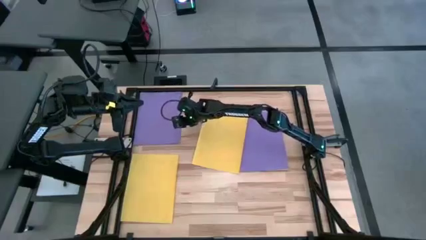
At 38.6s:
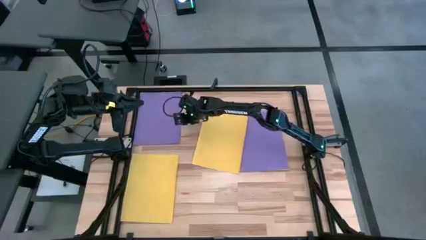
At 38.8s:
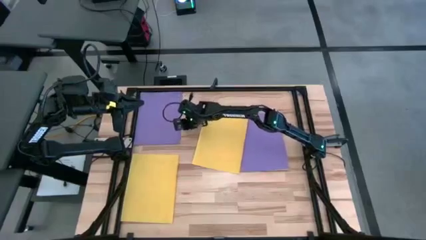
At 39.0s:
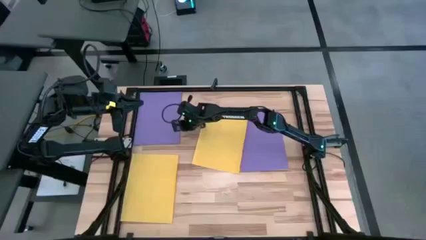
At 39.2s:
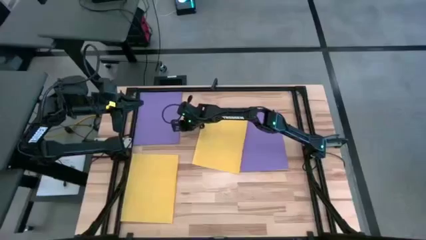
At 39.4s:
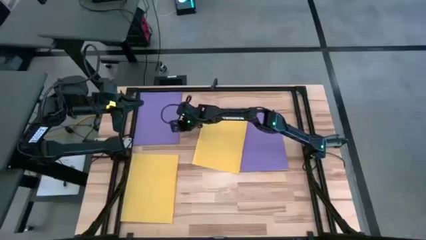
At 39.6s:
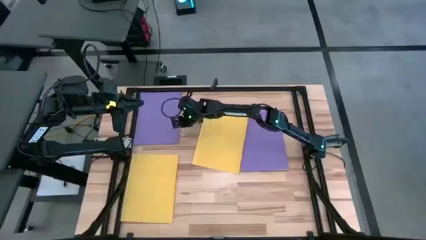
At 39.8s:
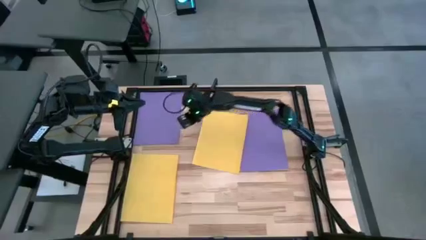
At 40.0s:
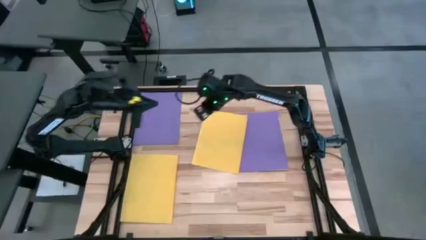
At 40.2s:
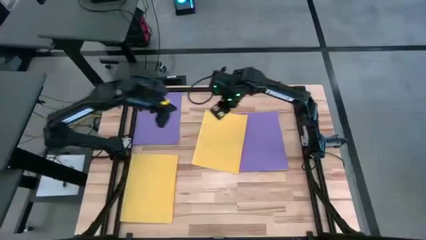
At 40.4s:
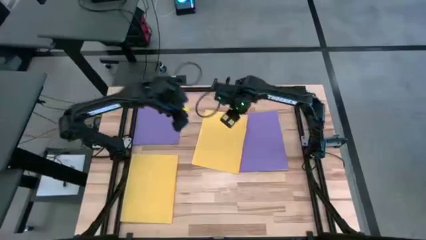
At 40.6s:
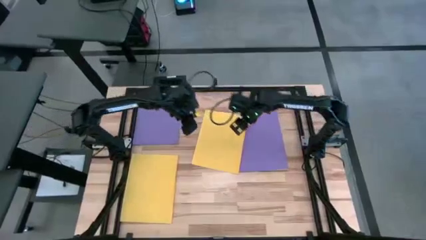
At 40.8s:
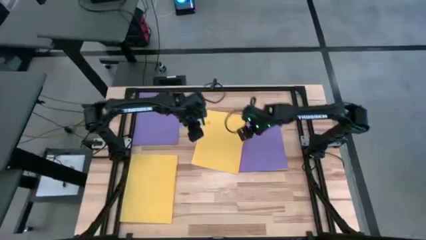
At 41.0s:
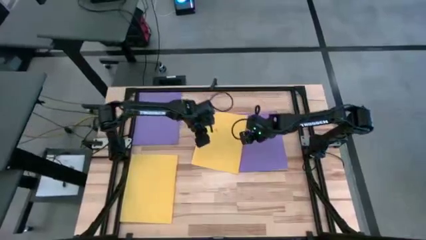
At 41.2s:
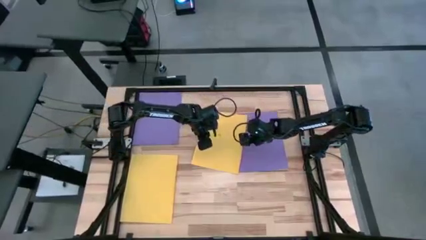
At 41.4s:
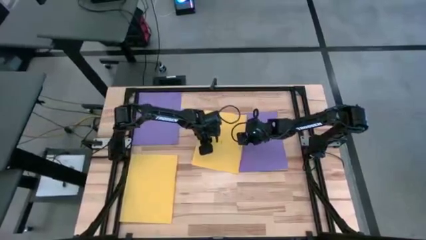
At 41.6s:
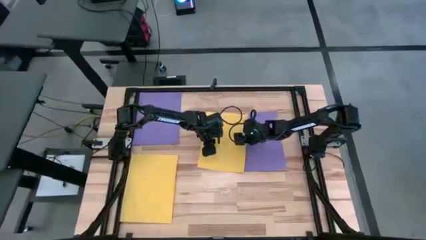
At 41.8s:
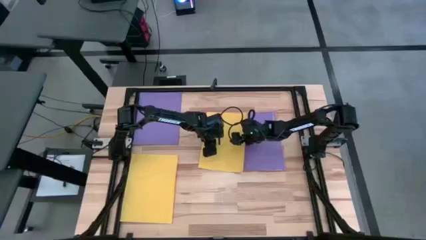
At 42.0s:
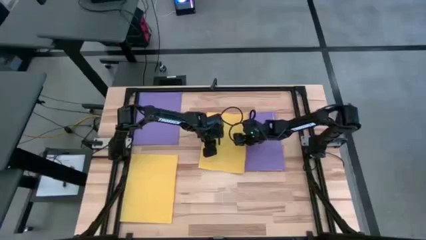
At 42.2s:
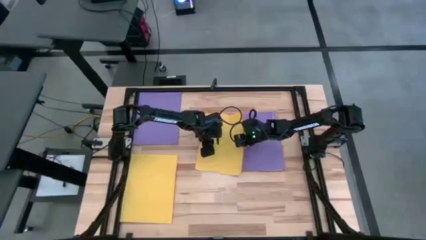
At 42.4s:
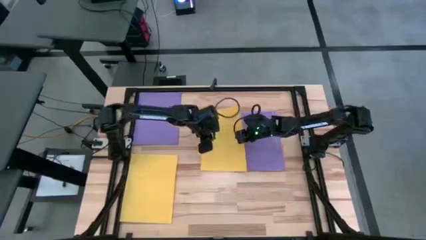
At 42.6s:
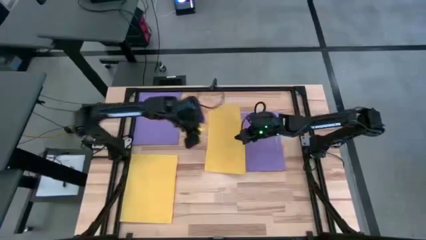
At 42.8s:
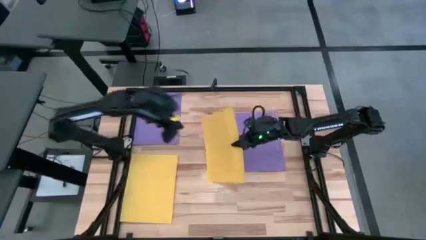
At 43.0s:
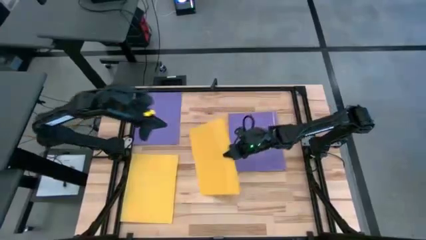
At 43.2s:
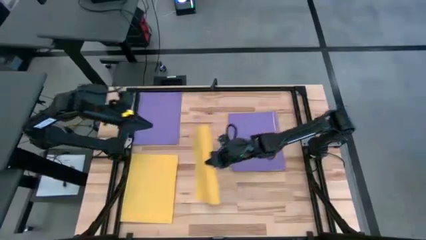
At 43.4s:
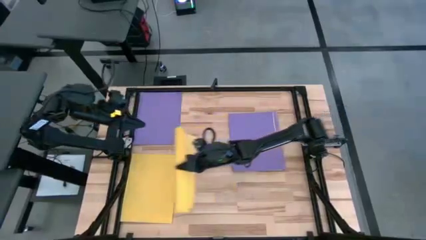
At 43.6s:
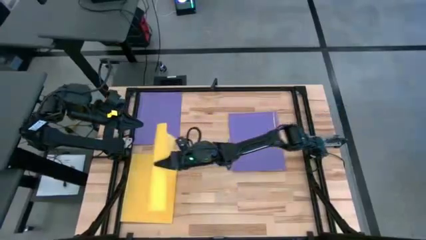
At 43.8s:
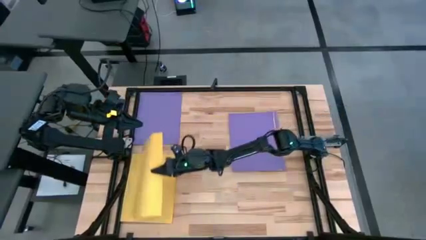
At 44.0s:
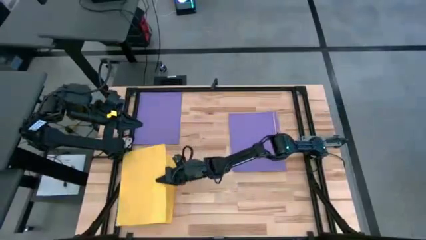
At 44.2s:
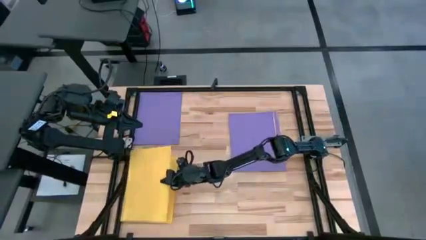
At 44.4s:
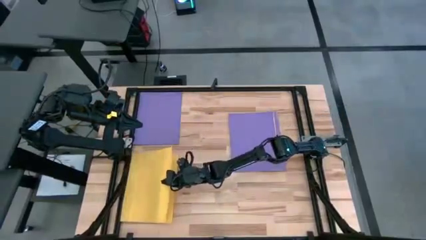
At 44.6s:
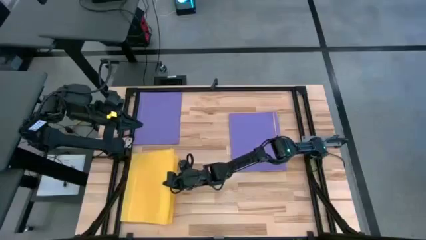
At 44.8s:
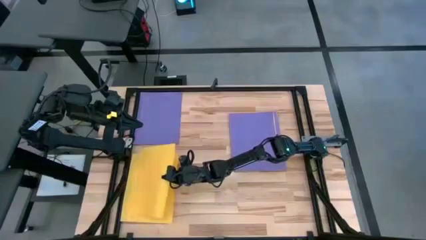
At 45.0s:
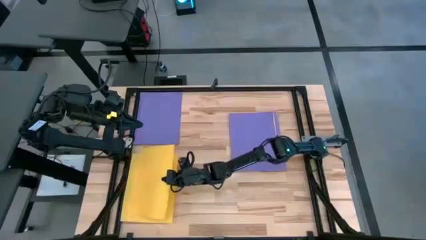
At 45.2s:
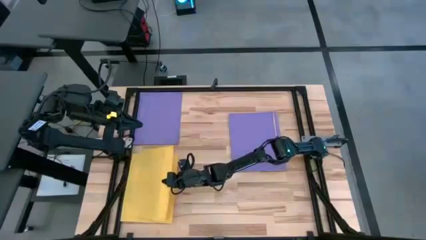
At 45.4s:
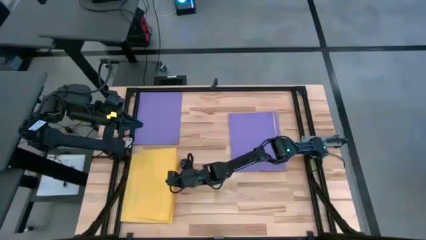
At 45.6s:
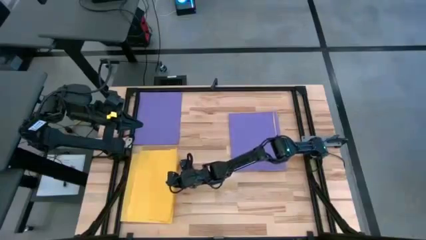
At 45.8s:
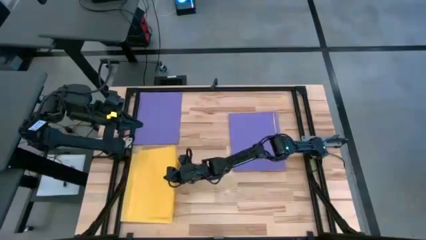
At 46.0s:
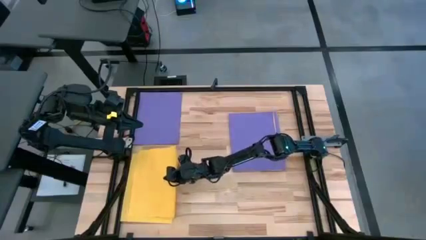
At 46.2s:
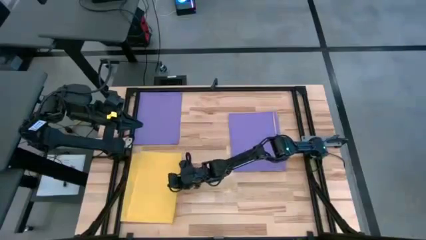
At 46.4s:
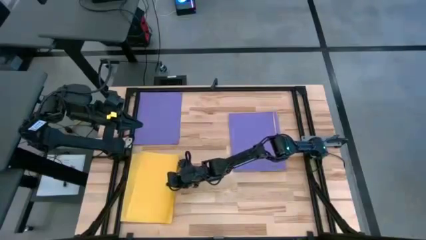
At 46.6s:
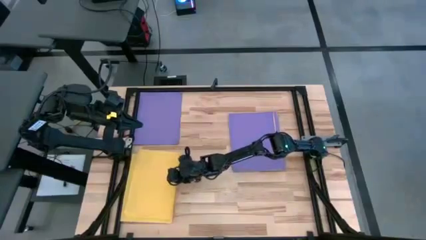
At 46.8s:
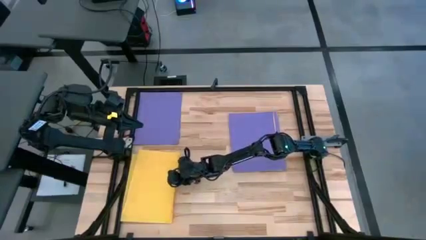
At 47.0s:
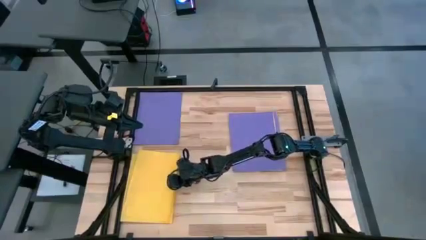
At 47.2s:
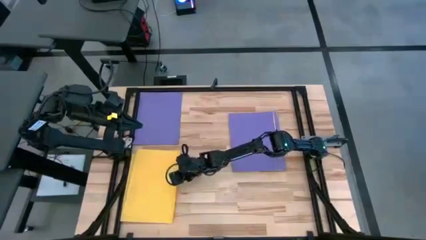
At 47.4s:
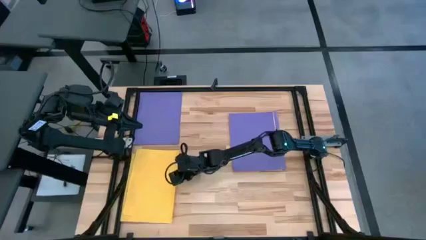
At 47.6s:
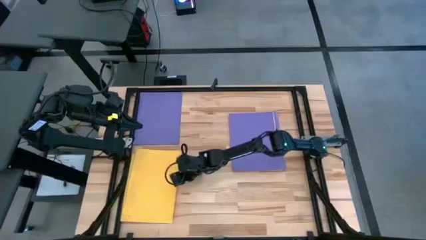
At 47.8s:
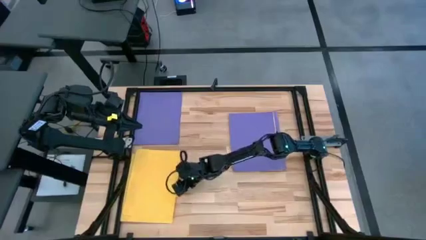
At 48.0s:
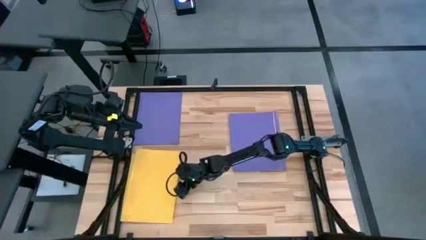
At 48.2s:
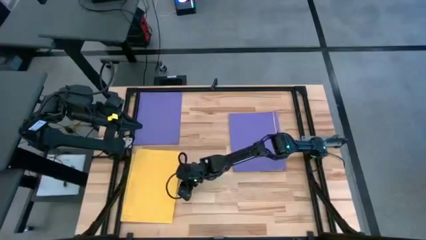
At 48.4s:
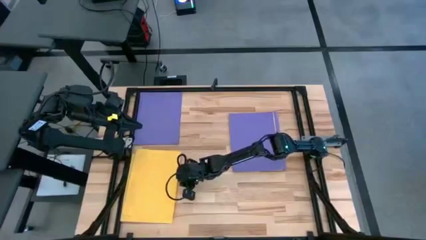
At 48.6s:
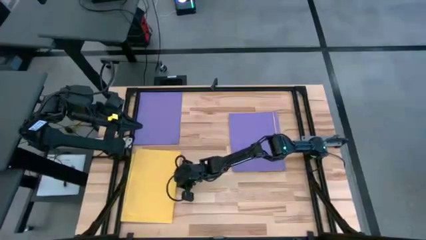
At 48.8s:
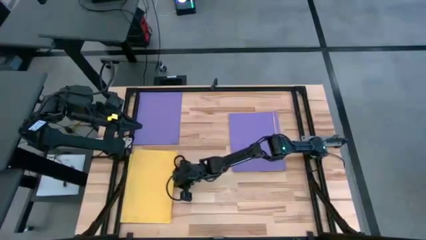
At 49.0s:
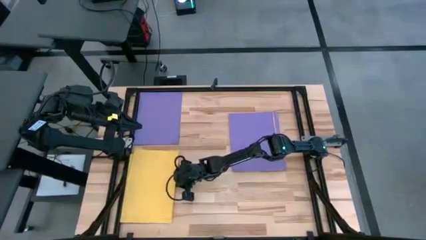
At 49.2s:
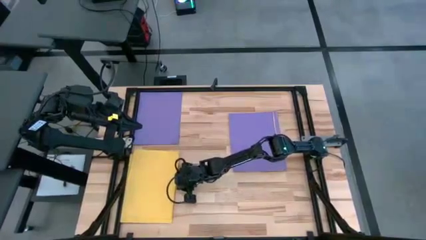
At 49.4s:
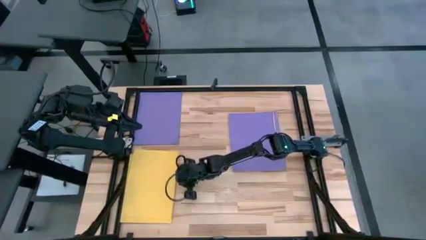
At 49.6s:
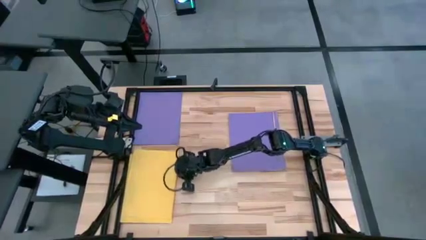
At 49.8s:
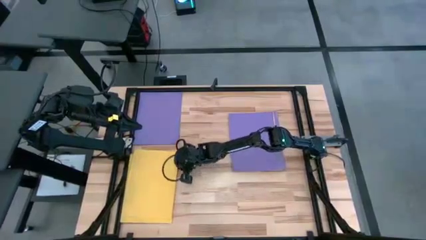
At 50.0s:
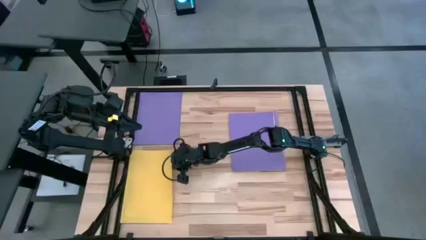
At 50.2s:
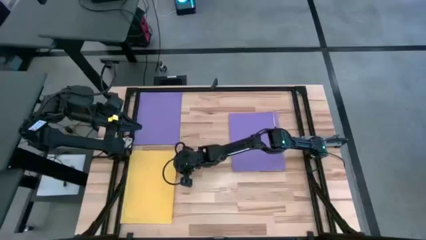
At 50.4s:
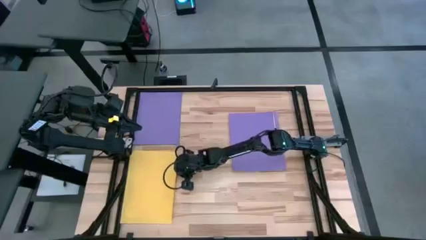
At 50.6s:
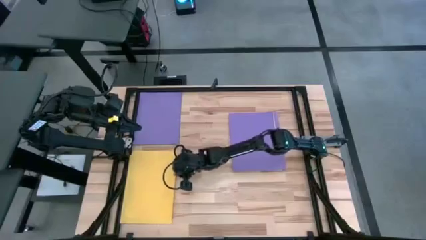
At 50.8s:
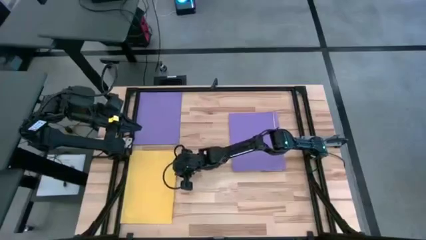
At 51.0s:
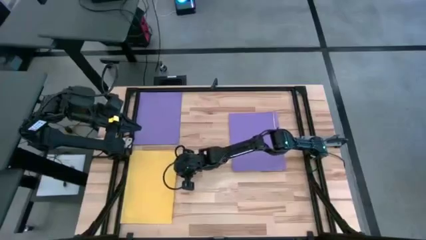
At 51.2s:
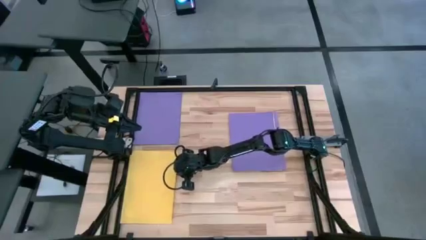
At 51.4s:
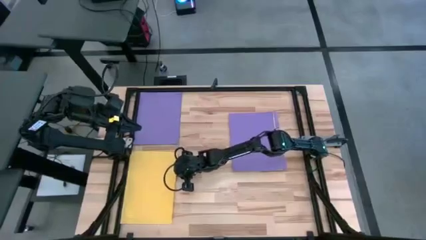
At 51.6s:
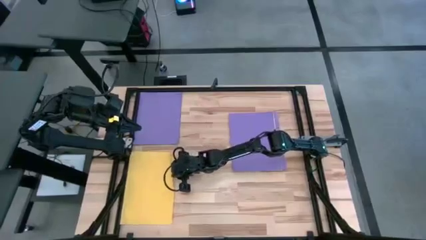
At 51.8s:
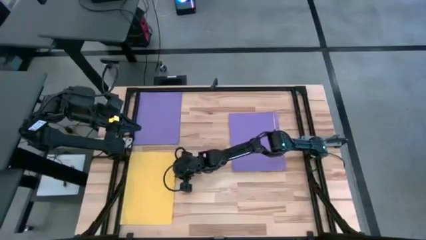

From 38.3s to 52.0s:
Task: Organize paper
Stack the yellow paper on top of the other yellow paper

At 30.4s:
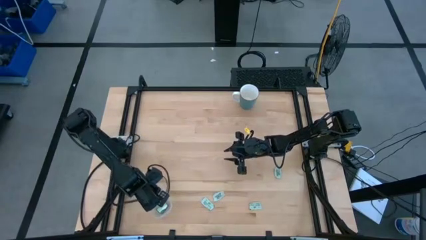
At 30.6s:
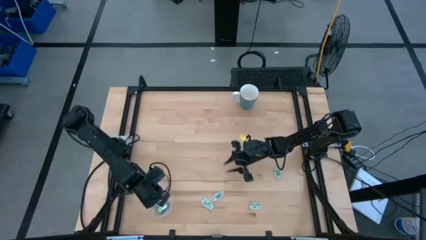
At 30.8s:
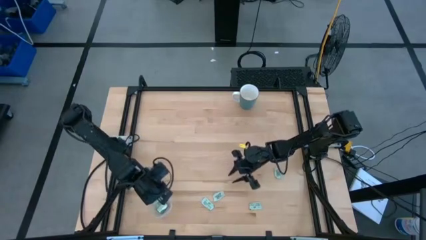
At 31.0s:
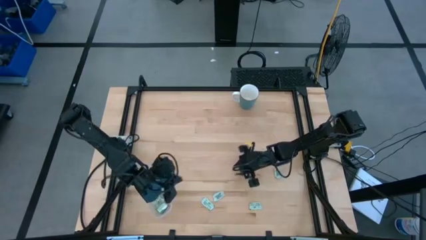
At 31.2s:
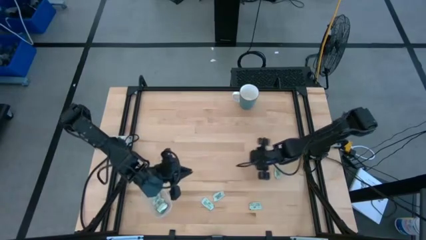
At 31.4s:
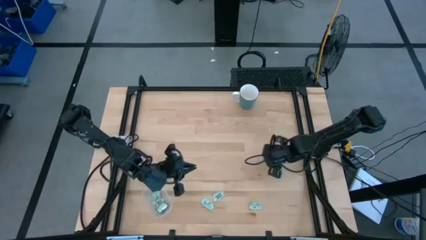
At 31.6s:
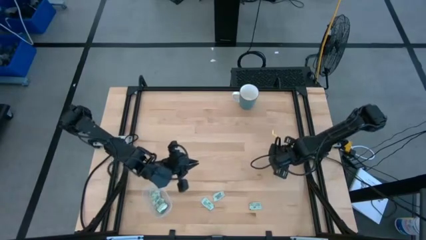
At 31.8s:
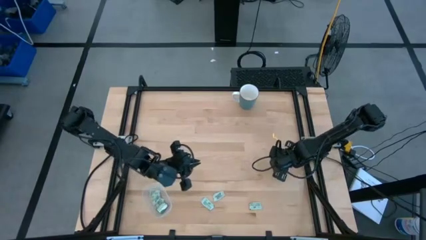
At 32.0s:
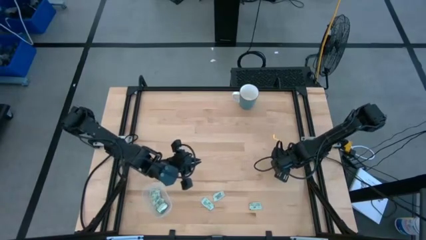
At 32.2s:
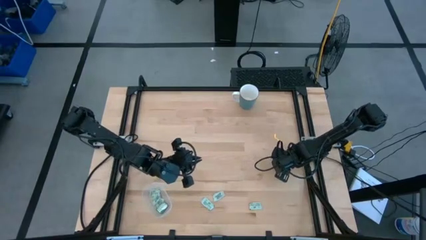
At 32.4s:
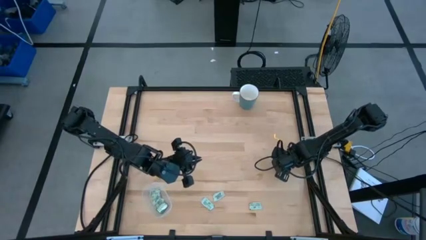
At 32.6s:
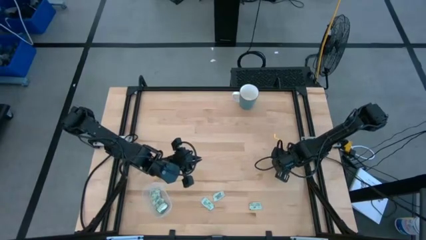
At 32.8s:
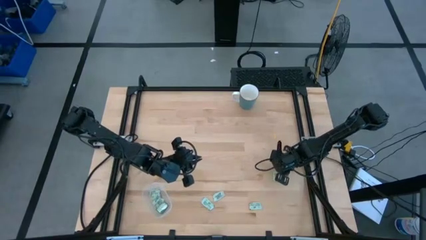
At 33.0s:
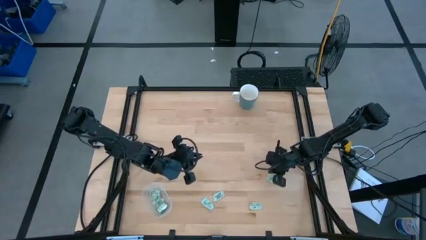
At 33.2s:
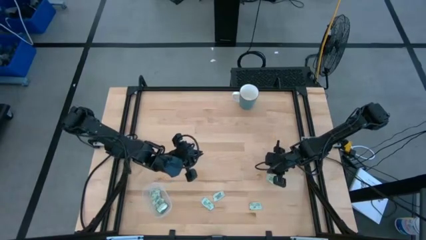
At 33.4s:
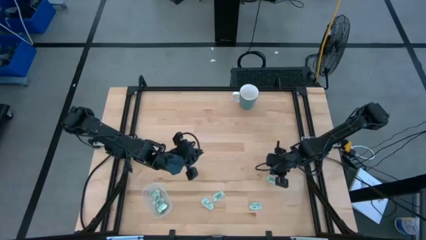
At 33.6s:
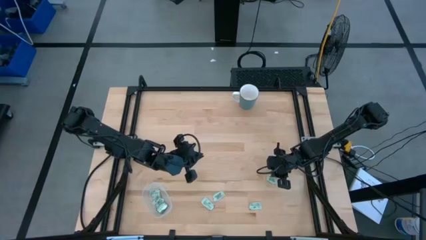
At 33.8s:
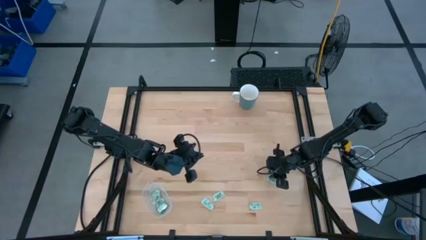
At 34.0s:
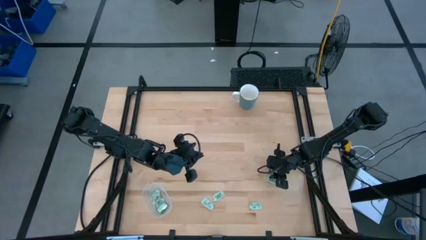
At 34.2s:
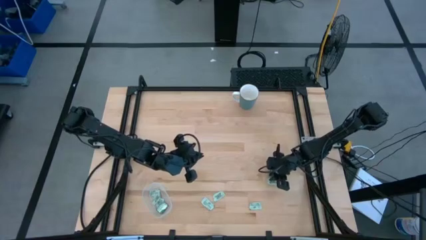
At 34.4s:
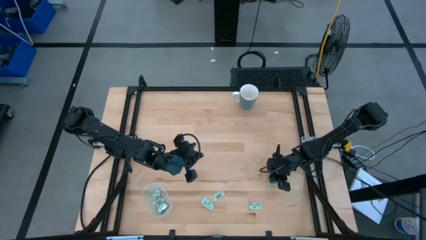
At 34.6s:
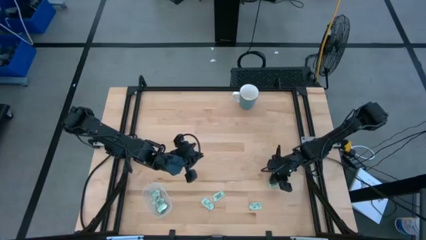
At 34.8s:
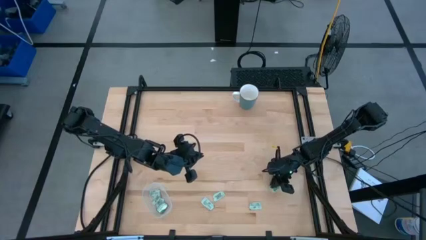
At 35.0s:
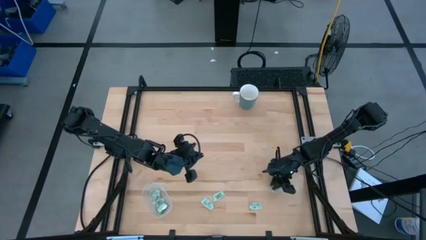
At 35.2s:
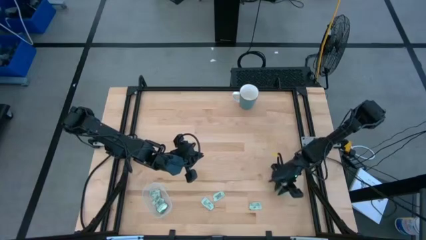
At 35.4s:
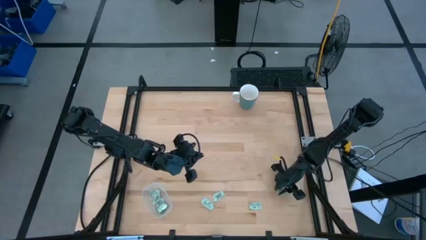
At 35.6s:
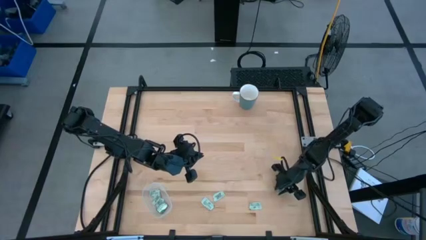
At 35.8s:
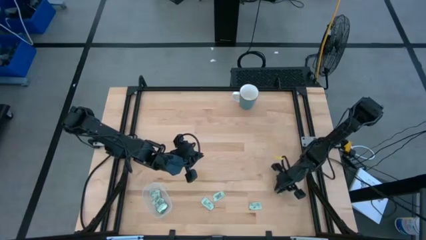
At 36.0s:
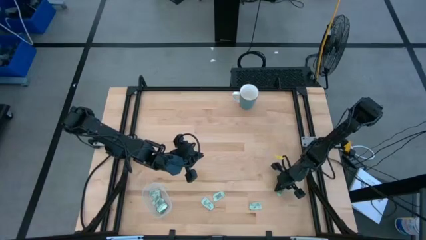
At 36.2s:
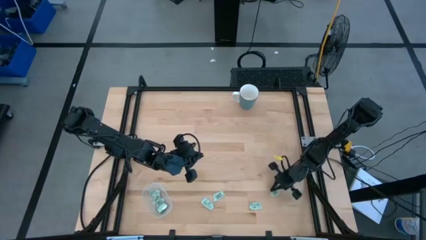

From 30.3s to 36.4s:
Task: Pick and place Stevia / Truvia into bins
Put the stevia packet into the transparent container
